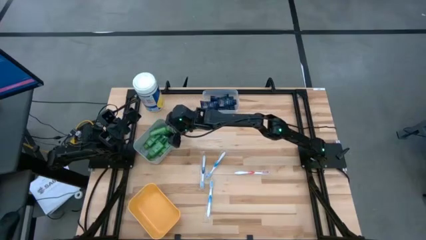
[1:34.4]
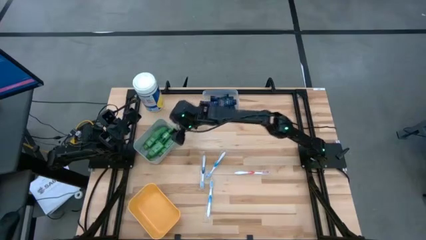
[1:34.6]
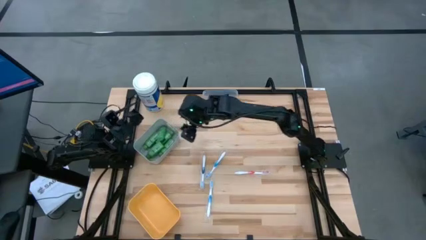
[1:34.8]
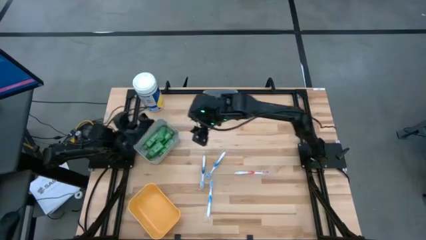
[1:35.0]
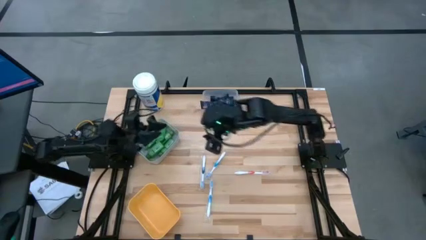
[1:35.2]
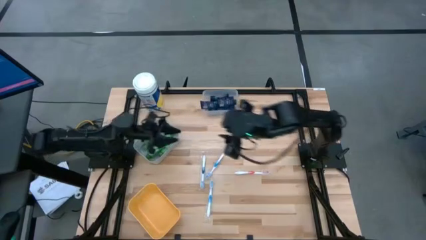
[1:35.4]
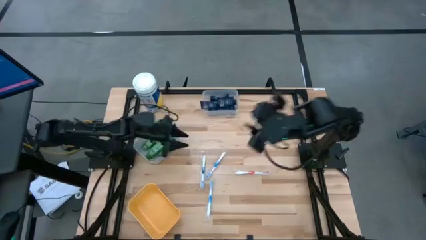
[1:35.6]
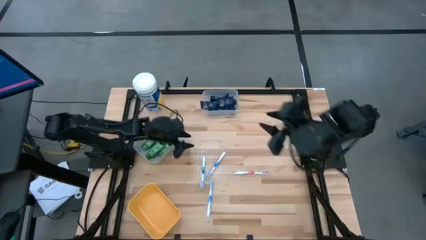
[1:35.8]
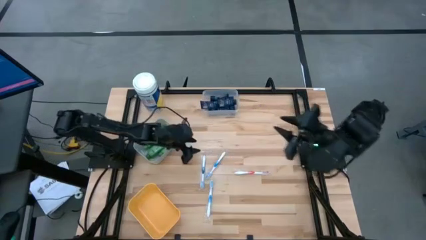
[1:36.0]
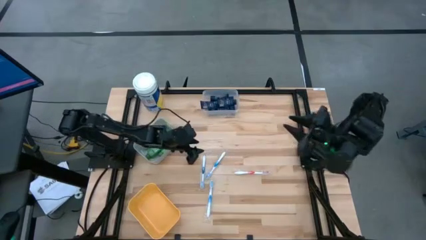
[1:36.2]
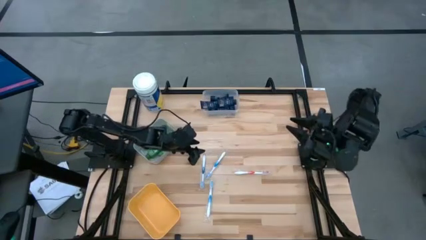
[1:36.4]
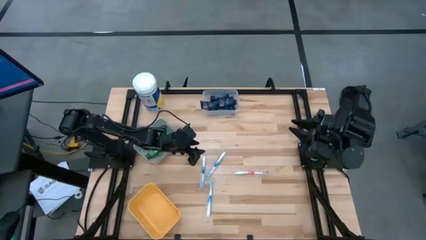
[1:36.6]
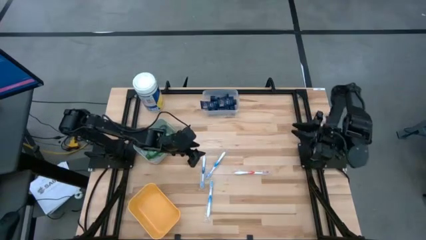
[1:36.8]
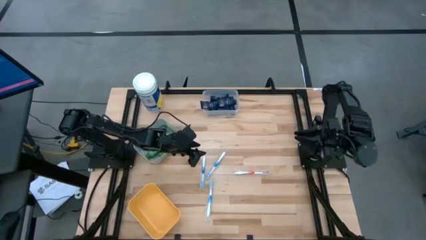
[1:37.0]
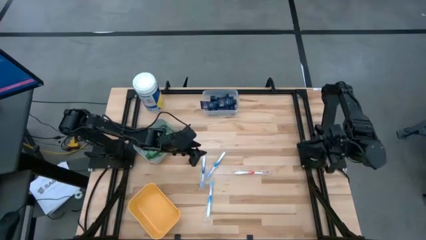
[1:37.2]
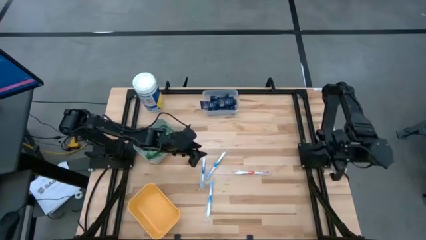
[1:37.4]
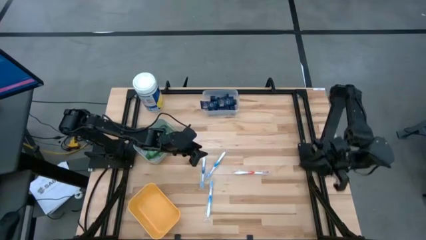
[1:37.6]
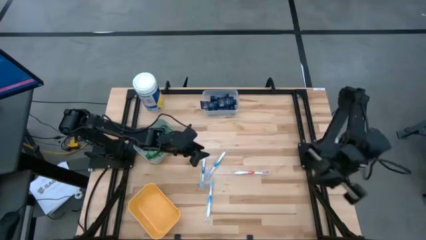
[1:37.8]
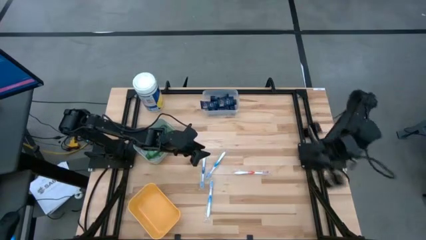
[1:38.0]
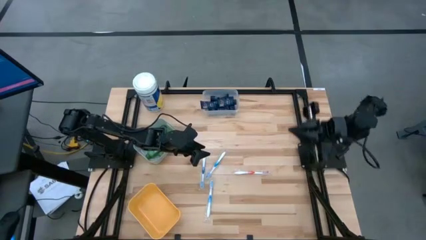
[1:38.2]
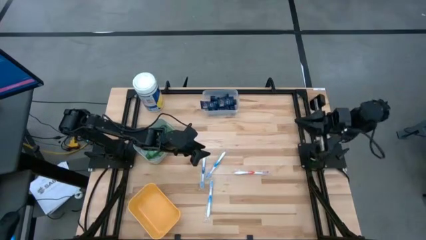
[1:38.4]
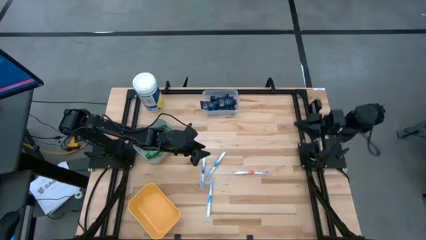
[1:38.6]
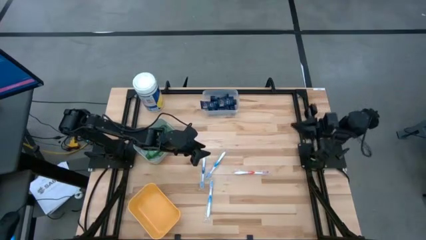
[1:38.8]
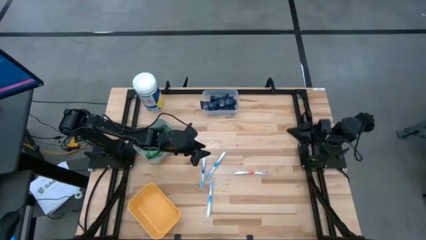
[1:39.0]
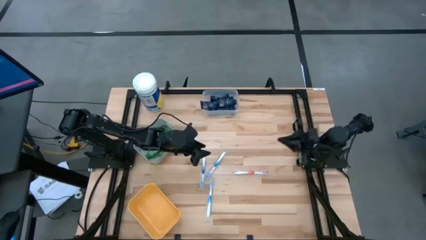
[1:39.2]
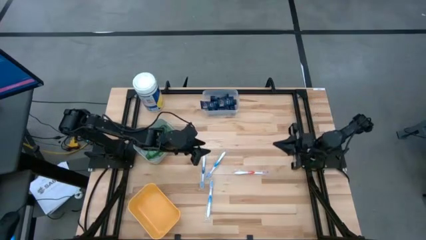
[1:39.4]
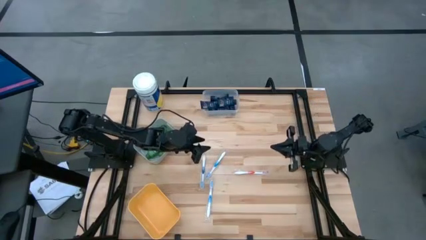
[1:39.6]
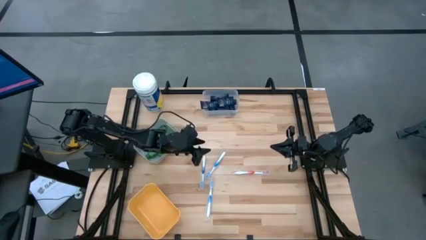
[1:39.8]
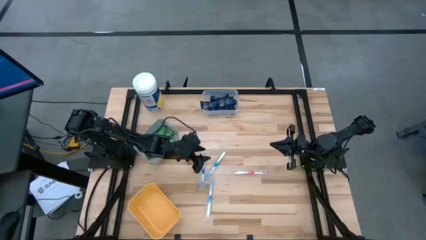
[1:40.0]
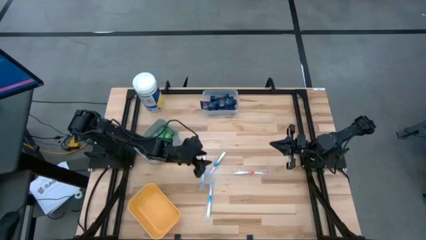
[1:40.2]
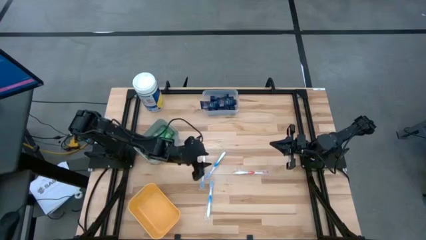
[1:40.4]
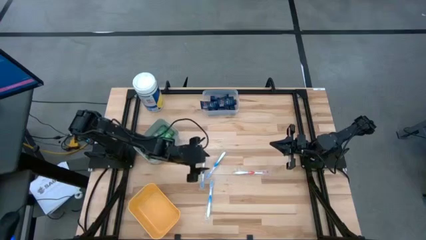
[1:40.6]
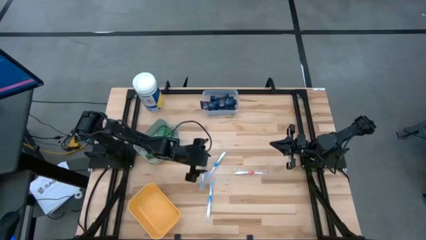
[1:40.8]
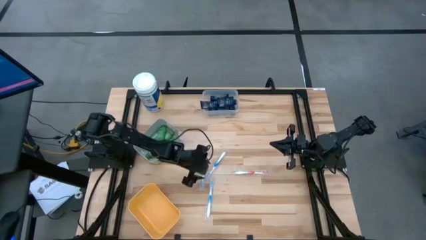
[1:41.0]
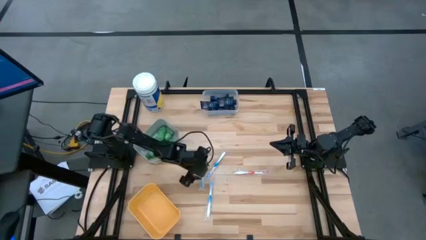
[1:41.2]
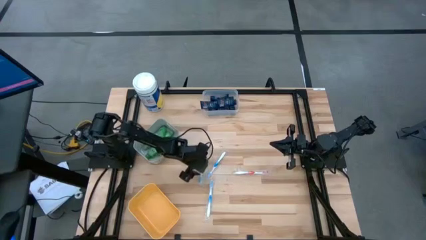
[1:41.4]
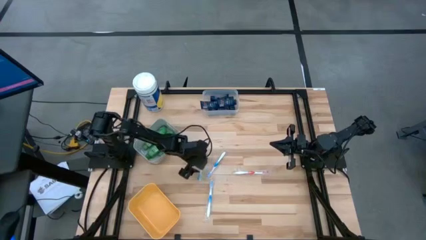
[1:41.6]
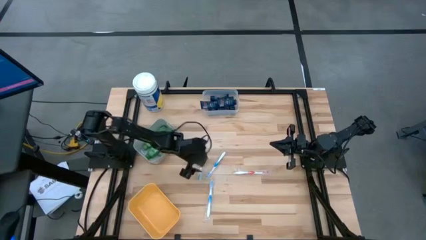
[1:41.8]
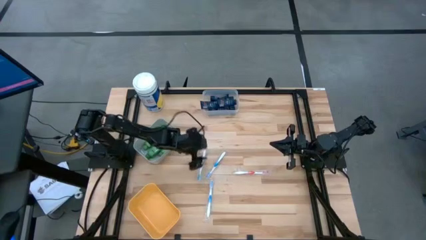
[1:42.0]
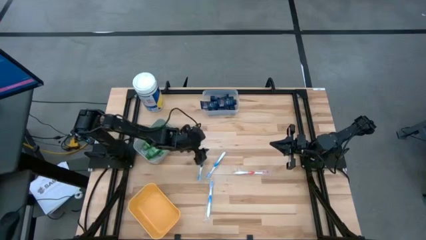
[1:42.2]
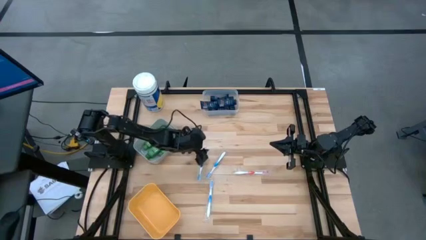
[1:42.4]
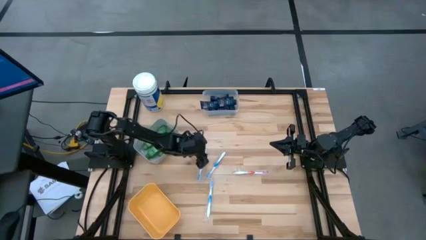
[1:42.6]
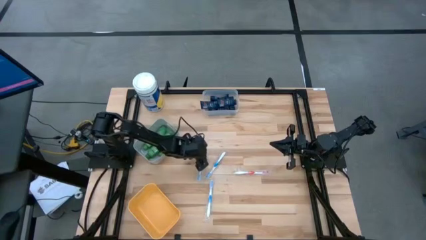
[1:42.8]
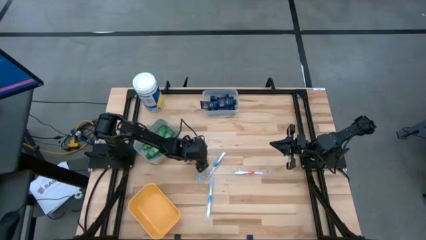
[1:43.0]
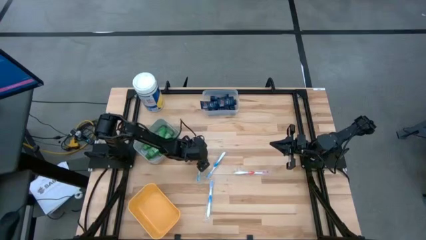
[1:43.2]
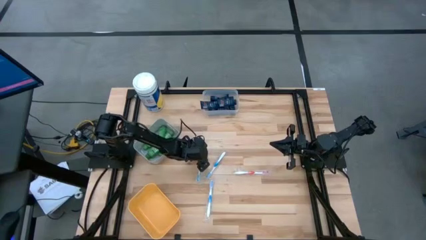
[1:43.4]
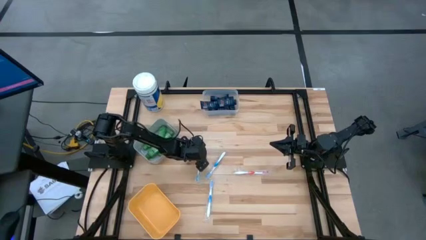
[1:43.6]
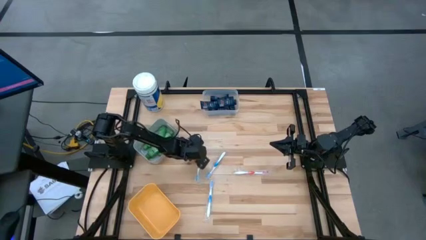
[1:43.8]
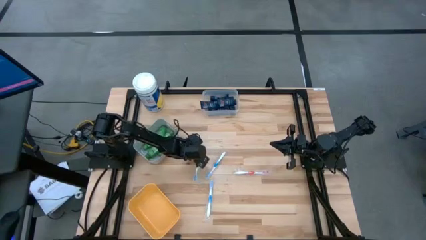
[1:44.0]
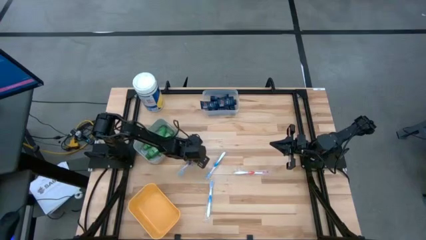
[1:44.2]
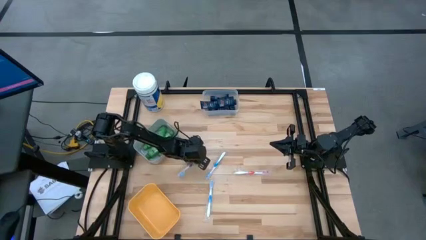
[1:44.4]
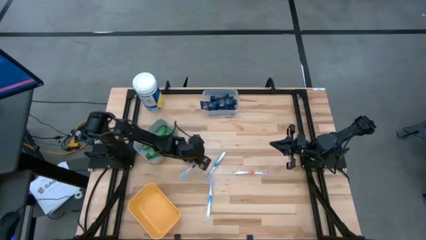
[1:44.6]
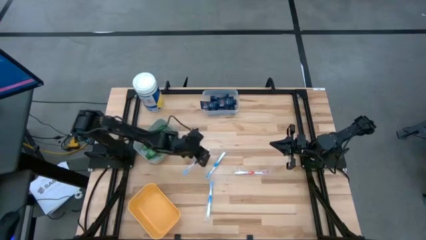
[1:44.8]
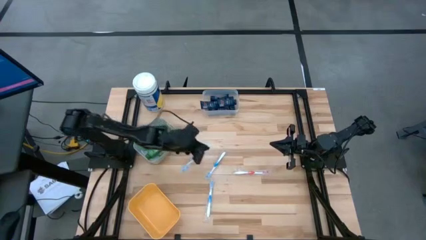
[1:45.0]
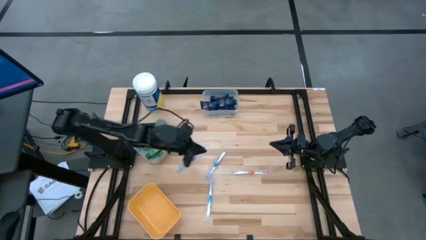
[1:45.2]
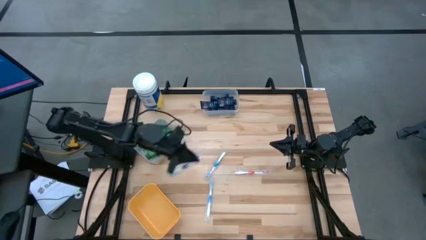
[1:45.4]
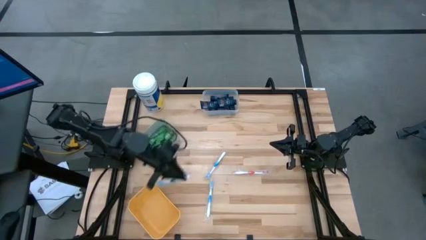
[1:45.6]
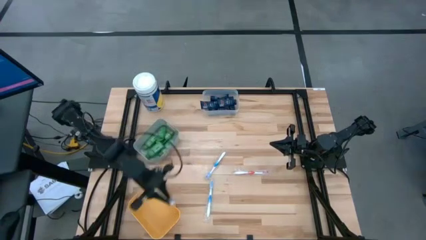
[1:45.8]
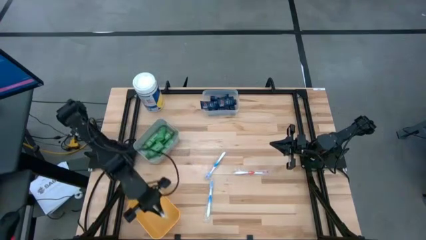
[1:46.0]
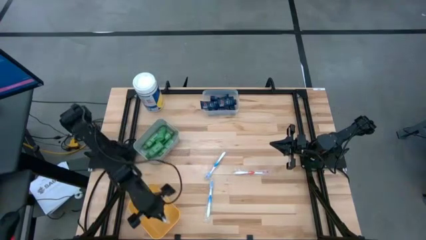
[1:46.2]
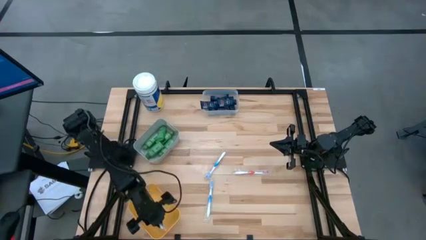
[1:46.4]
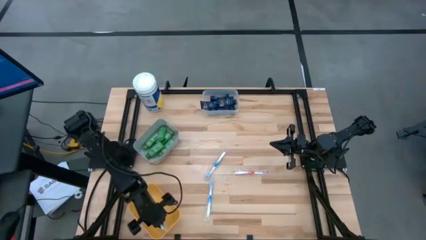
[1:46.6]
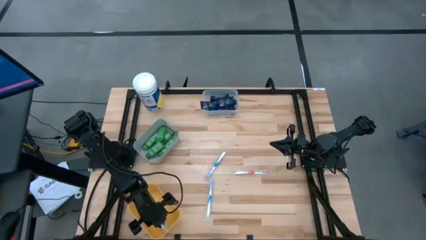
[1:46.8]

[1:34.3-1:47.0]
Task: Pick & Place Travel size toiletries
Put the dark blue toothbrush into the orange bin

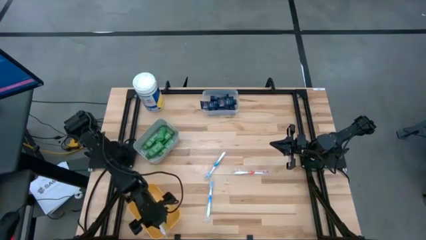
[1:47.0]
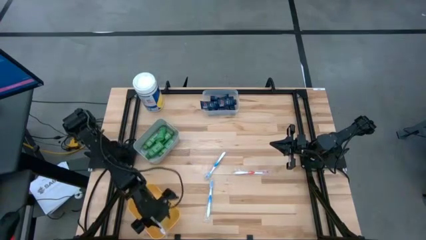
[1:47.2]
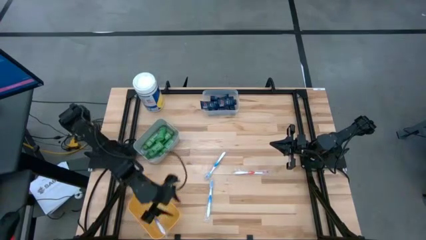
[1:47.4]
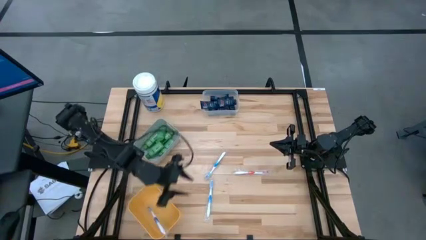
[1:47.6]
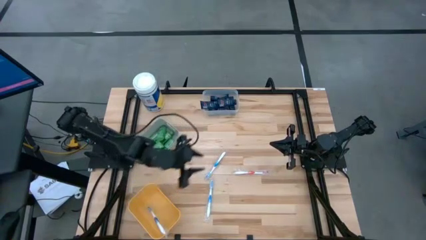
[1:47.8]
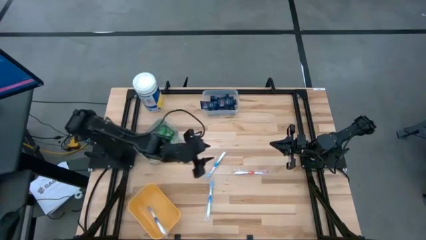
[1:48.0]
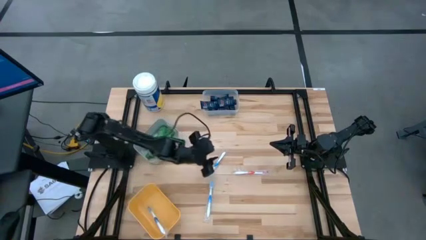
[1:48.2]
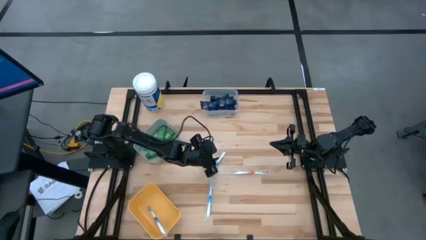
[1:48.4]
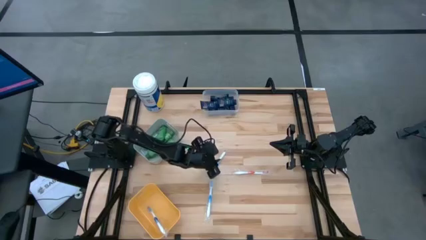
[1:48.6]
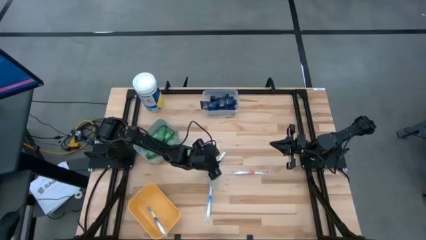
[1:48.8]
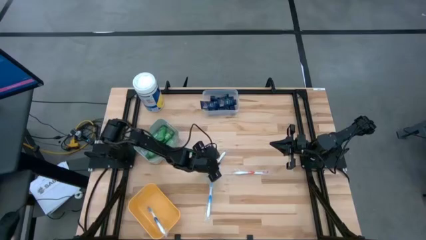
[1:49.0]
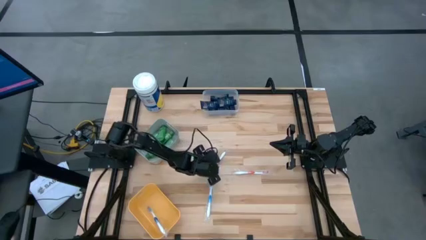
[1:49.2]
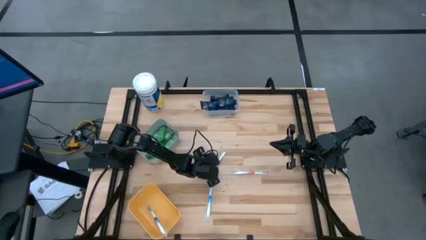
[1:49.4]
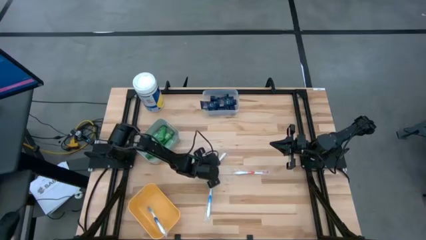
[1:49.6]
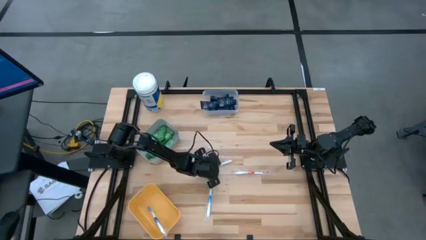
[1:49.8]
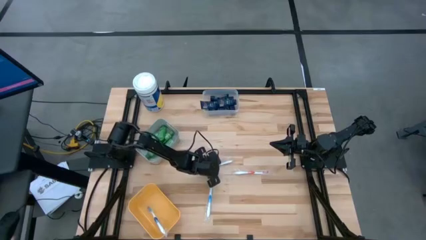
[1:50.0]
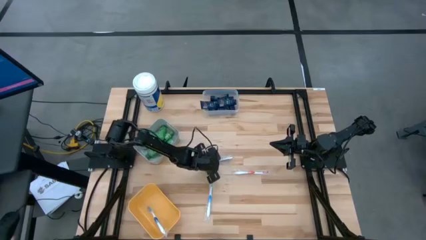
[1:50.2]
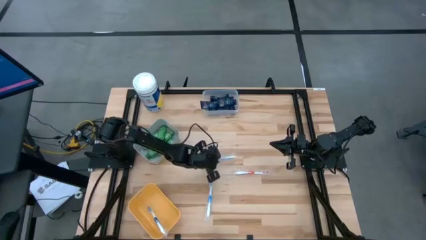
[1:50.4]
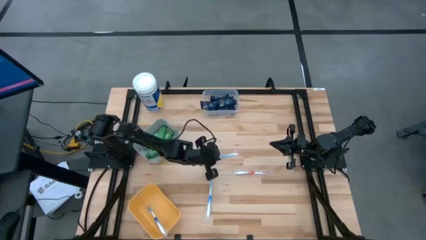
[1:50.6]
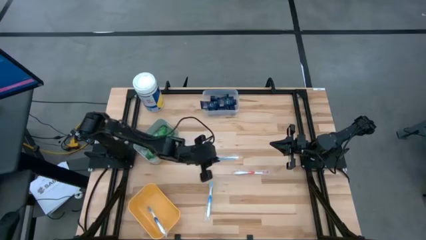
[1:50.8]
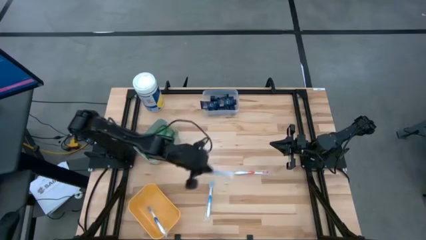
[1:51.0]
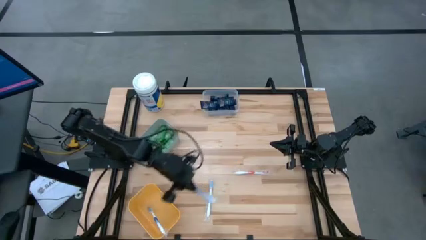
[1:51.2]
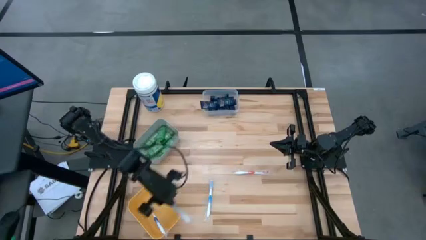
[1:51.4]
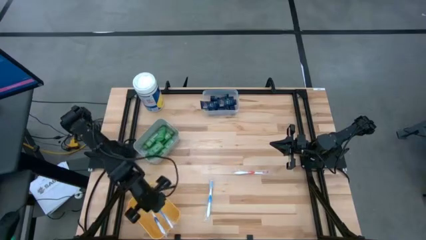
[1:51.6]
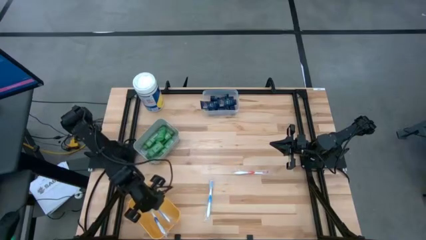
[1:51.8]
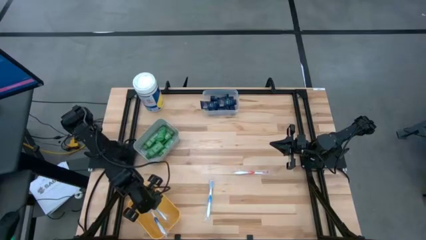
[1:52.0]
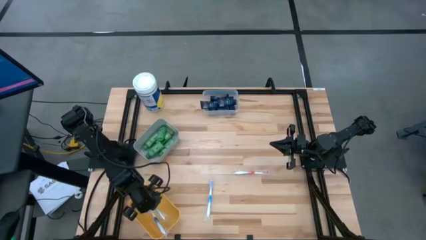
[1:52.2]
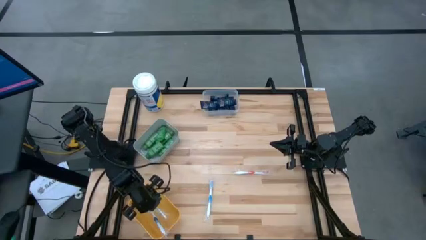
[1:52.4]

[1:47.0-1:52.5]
Put the blue toothbrush into the orange bin
